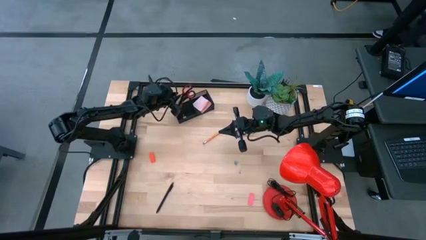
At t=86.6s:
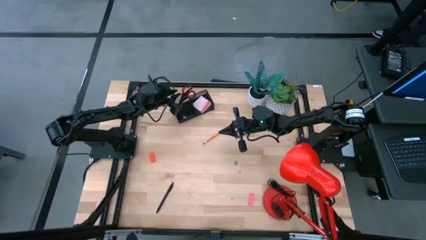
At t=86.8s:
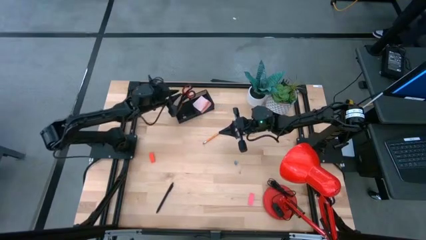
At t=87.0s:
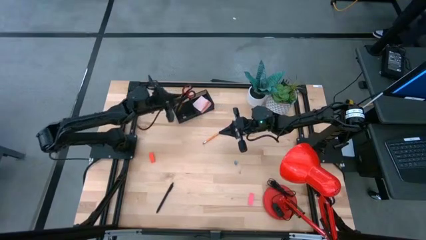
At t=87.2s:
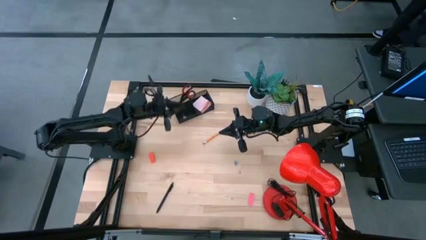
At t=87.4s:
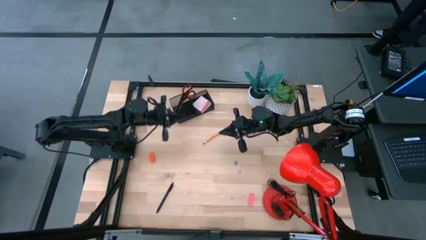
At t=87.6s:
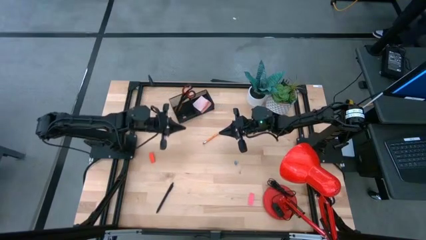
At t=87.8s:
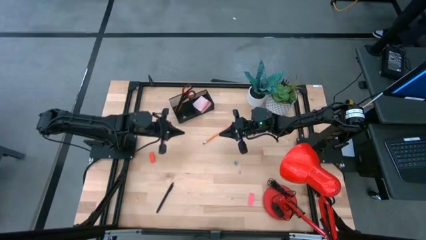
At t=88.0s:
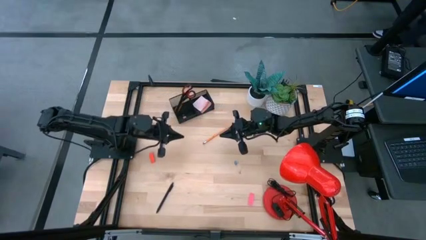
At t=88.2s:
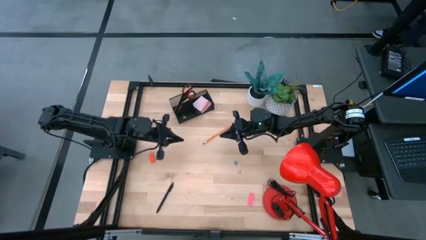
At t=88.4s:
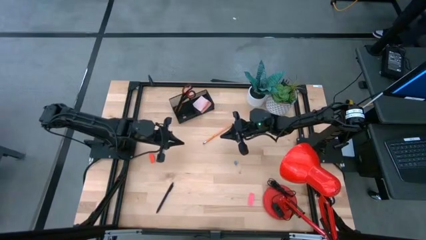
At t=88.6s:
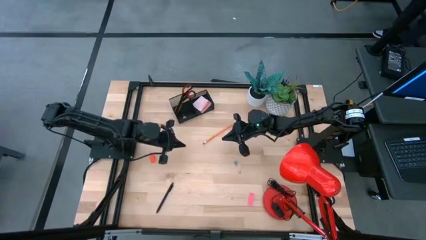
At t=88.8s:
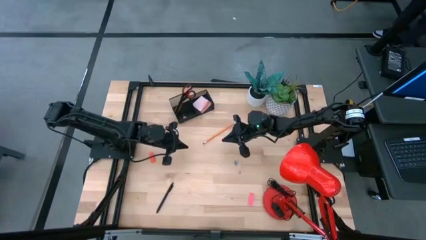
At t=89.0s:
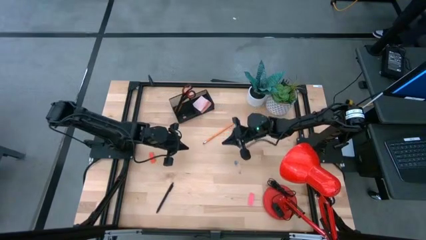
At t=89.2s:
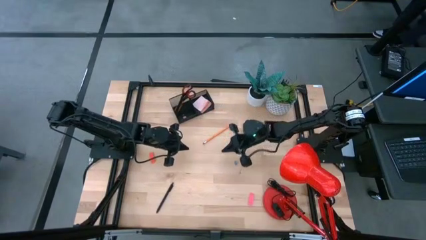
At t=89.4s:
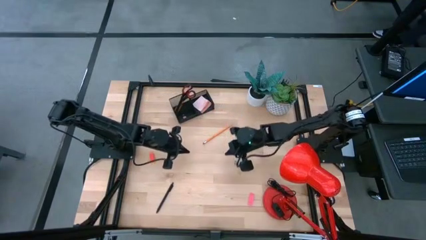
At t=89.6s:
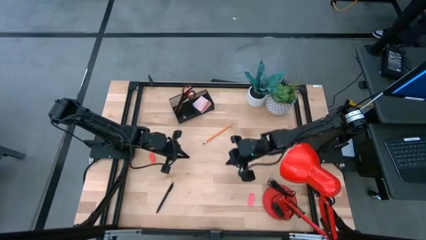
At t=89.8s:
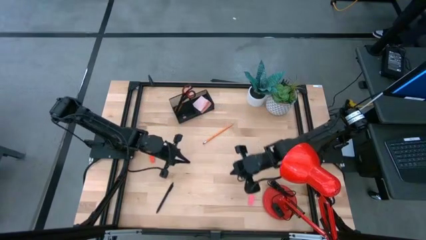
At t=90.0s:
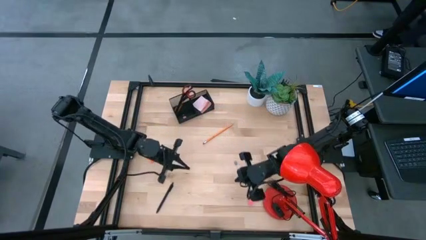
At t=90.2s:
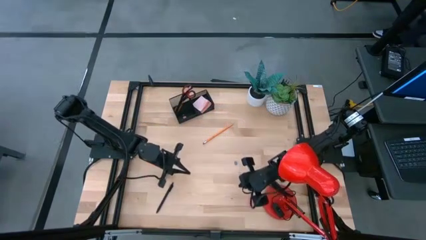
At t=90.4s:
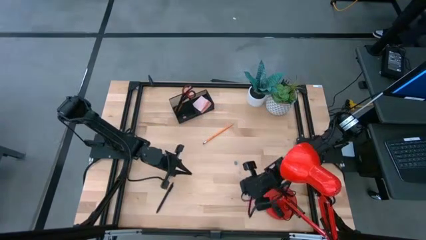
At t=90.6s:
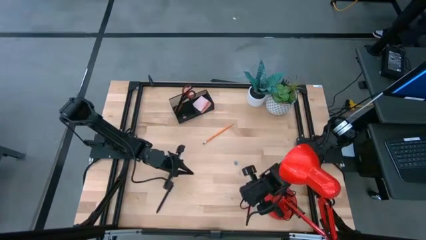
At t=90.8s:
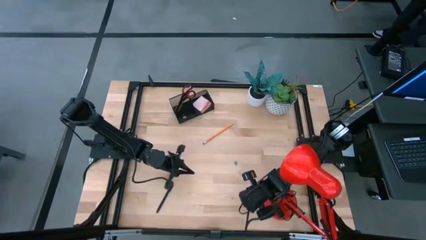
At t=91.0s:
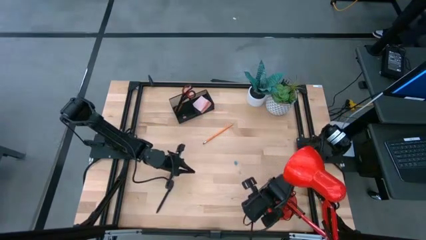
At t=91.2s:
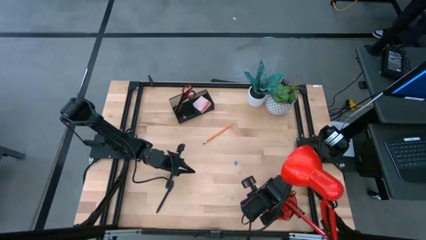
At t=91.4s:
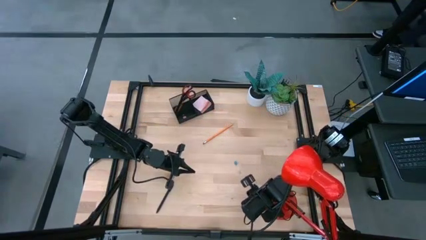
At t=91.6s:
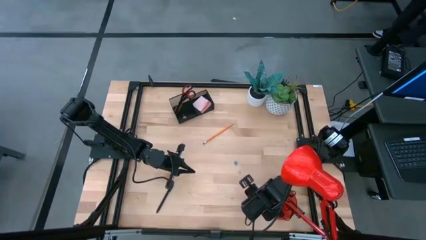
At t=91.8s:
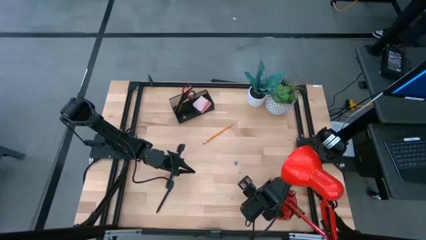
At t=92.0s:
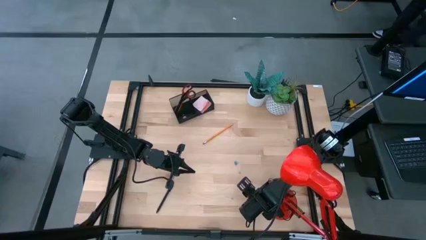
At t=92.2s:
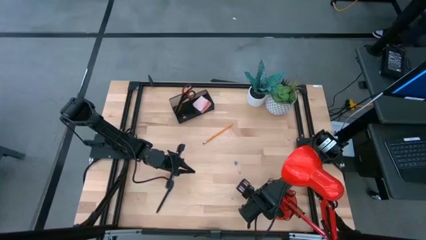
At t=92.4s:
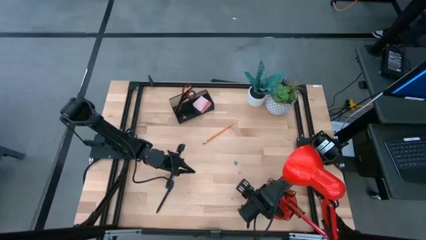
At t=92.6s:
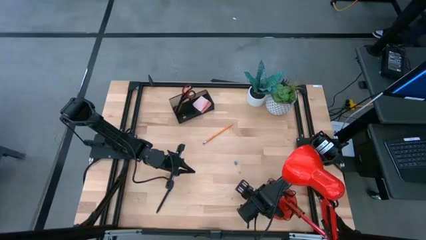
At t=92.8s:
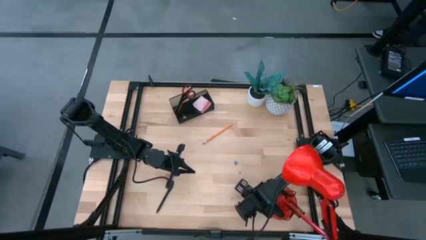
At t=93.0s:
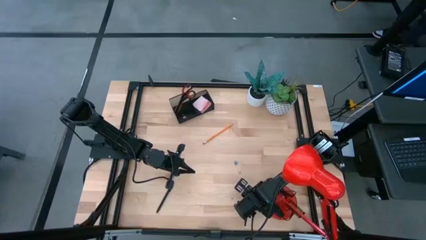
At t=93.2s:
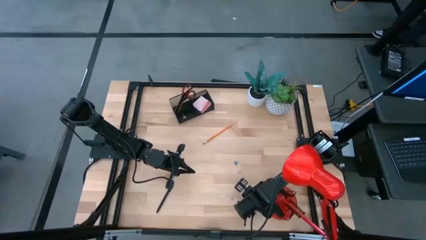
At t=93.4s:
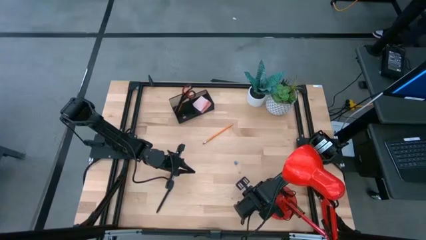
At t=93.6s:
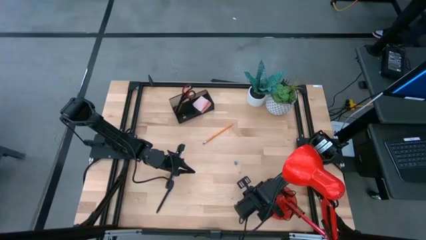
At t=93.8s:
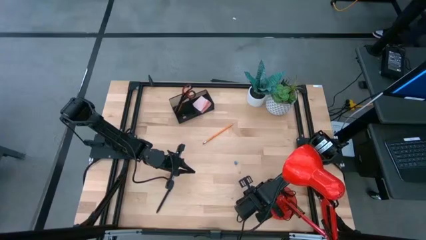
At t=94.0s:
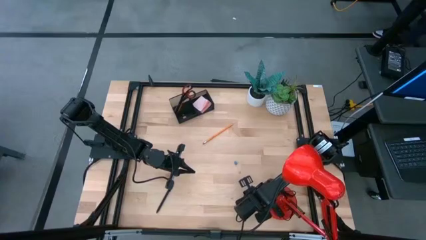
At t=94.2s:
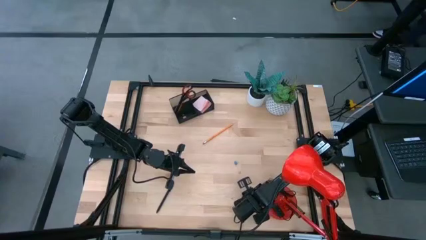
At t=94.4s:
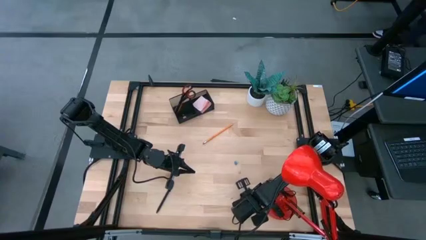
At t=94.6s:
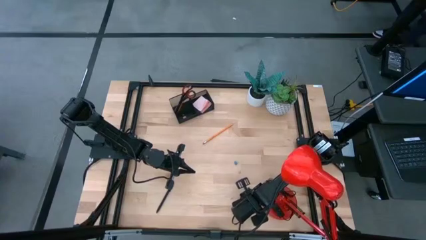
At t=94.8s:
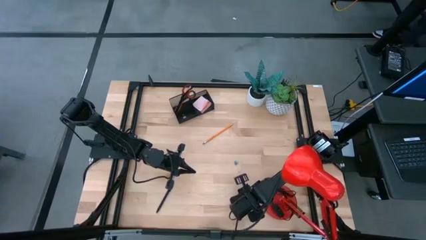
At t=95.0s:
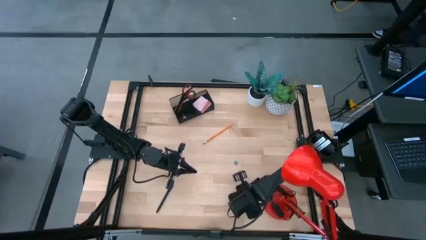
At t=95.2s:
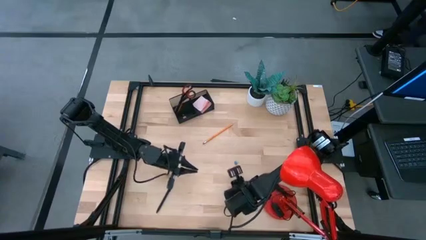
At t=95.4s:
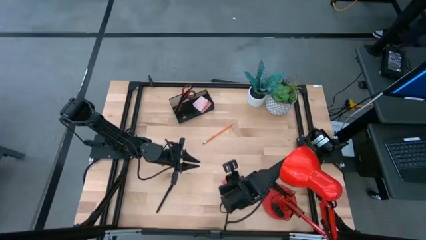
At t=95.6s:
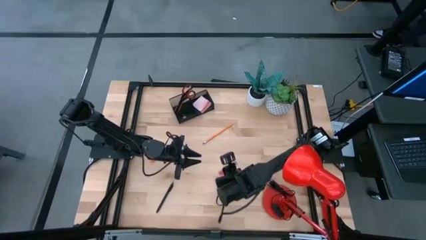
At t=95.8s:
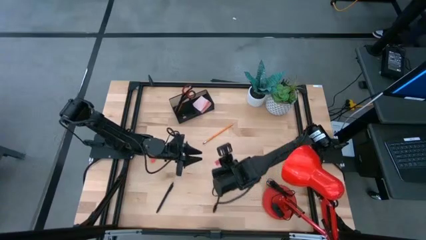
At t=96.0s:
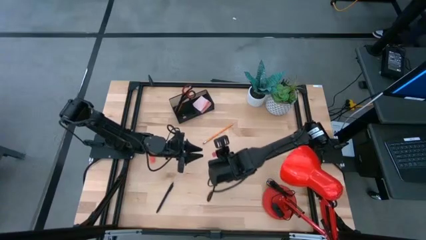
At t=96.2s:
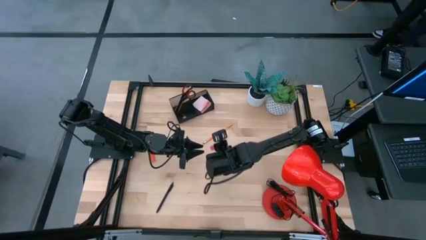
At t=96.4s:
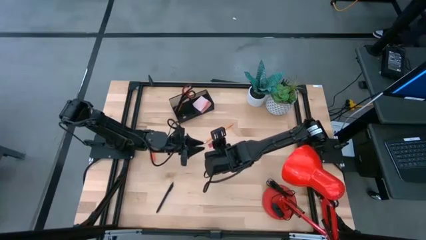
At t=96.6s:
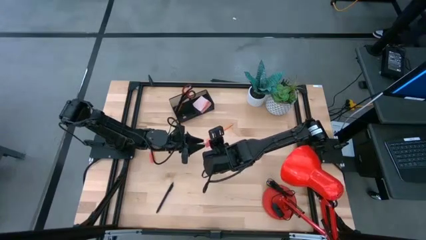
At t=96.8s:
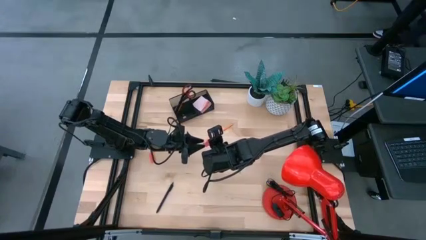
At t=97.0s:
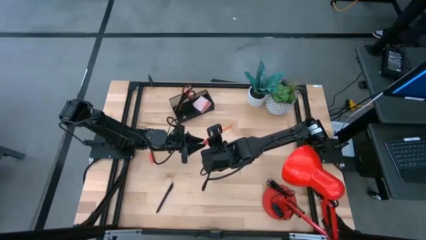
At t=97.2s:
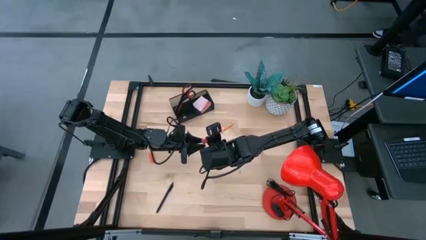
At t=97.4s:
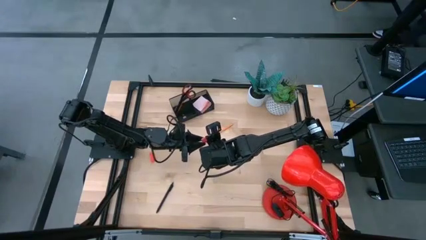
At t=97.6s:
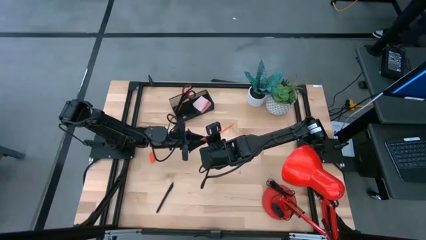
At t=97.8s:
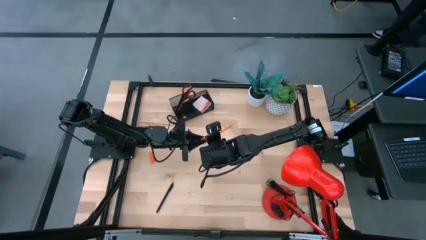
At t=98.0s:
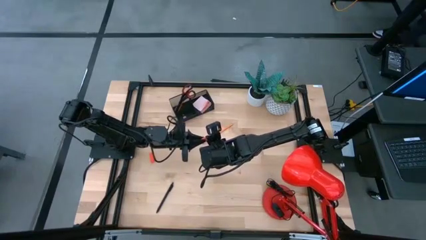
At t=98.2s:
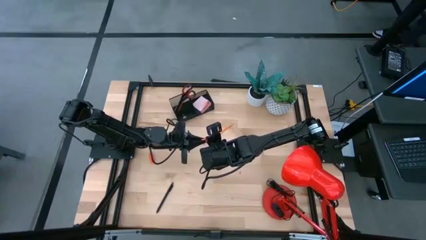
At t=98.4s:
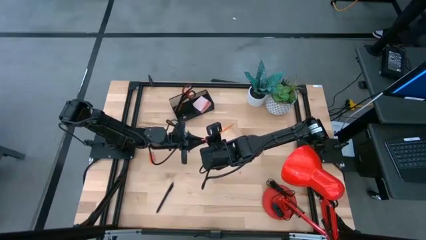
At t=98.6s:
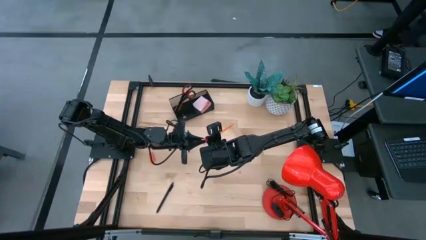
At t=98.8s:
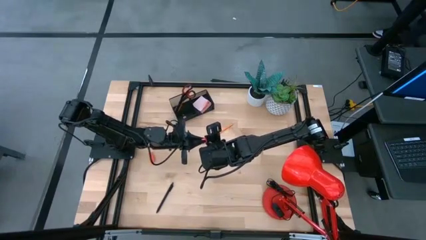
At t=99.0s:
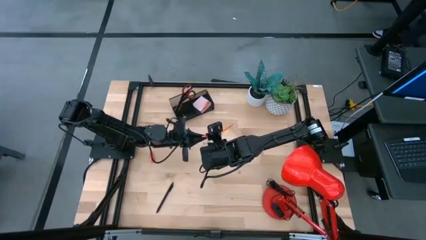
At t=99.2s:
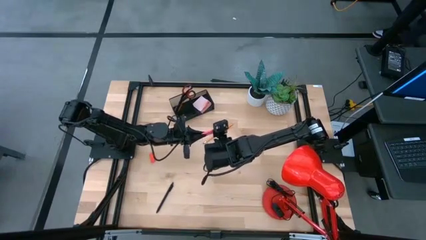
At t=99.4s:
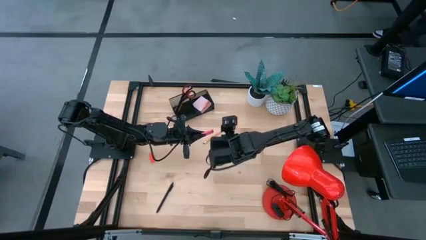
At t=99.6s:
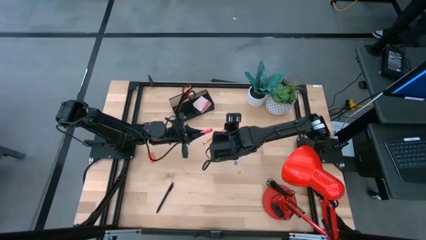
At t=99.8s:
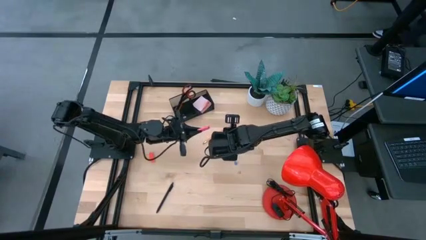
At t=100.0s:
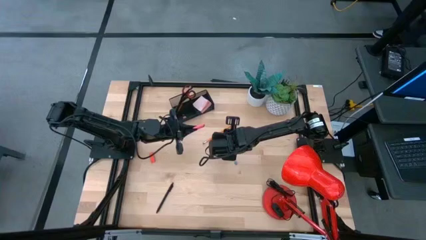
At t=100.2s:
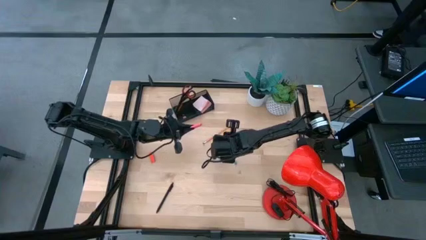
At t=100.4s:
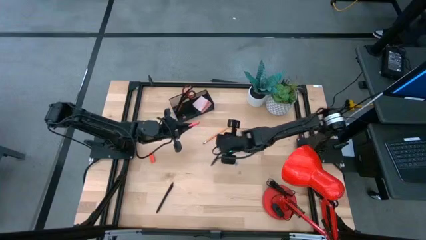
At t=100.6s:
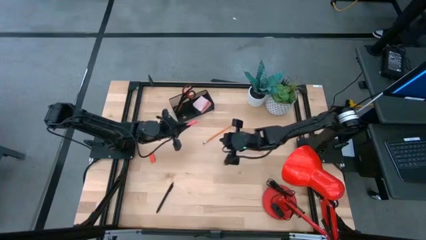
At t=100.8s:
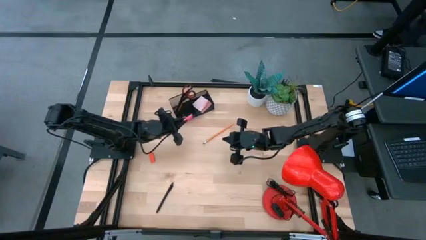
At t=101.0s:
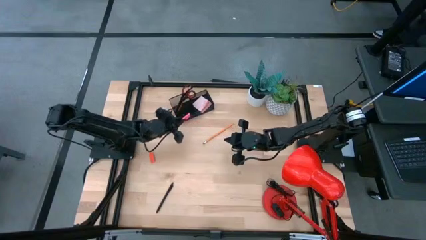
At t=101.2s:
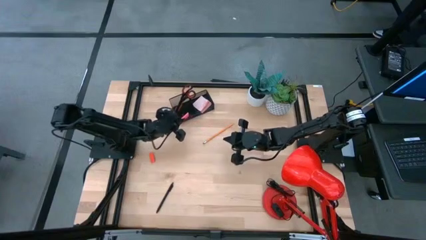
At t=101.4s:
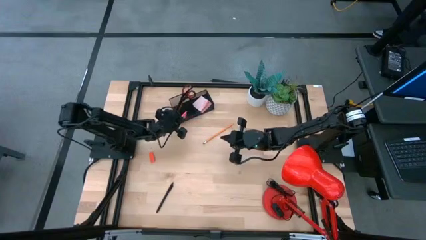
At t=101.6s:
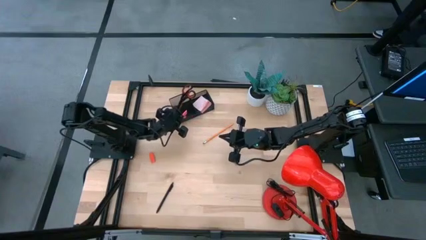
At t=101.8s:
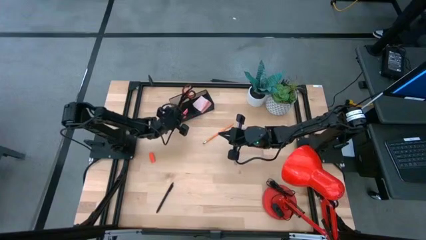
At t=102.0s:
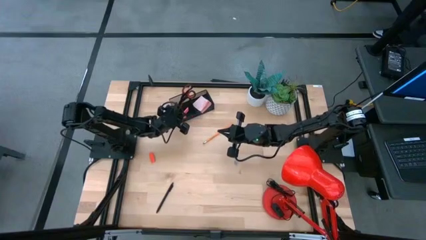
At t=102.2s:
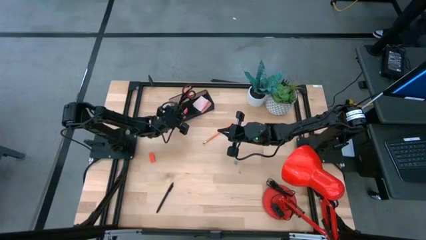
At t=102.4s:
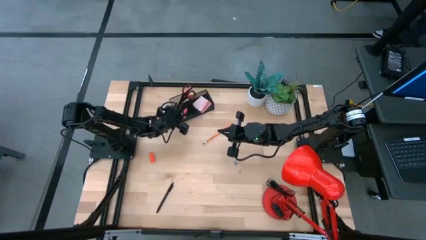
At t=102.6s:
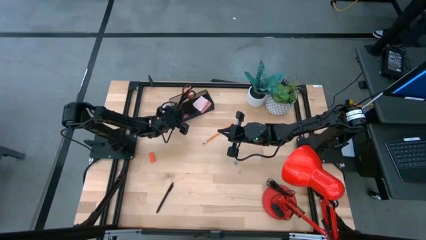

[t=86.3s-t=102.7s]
Task: Pick and place office supplies into organizer
Put the pink eraser into the desk organizer
